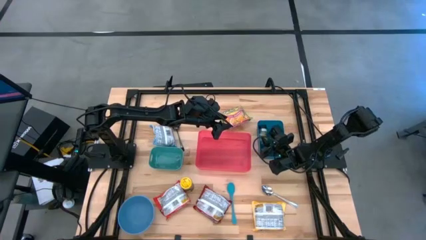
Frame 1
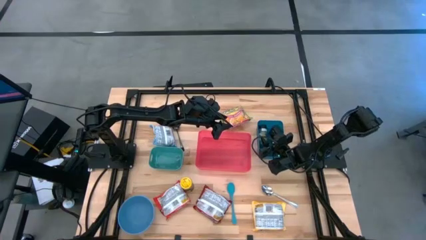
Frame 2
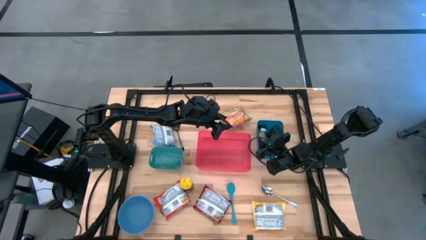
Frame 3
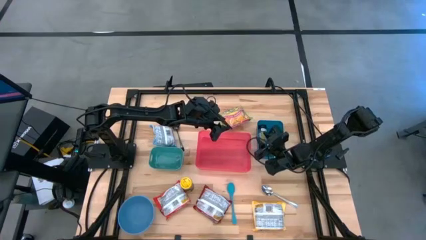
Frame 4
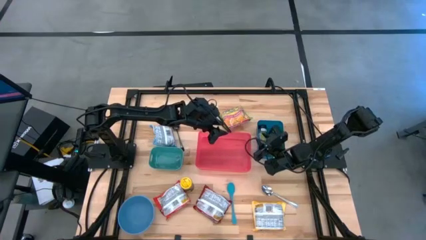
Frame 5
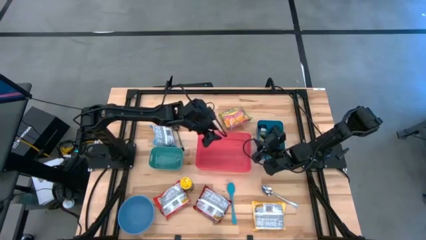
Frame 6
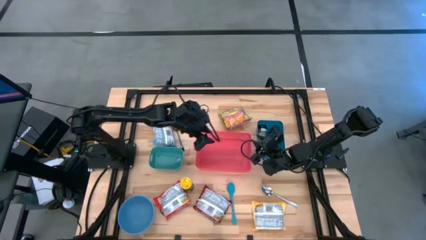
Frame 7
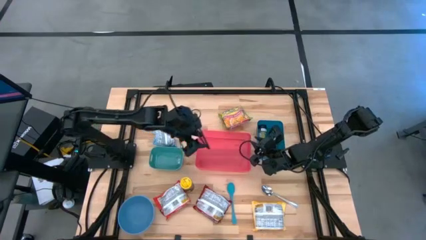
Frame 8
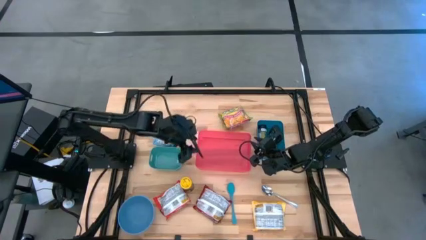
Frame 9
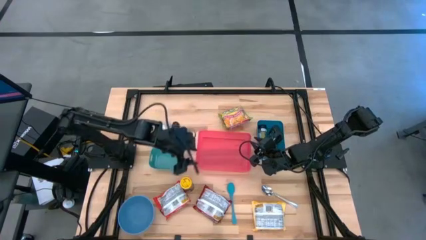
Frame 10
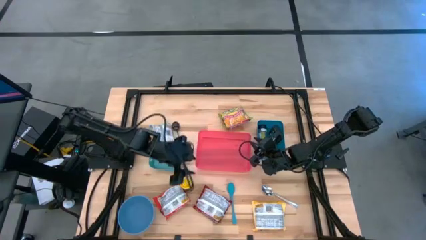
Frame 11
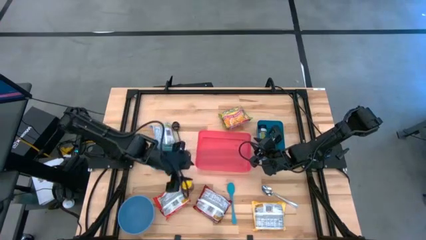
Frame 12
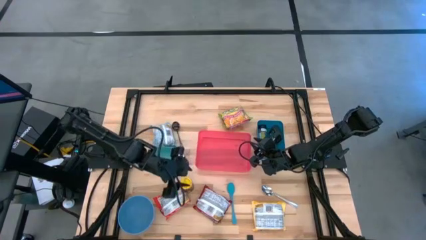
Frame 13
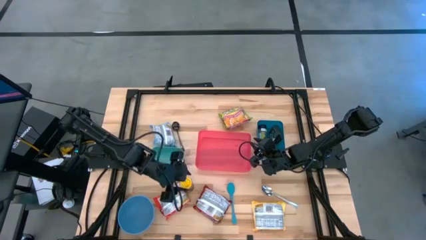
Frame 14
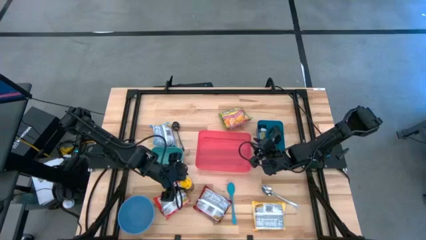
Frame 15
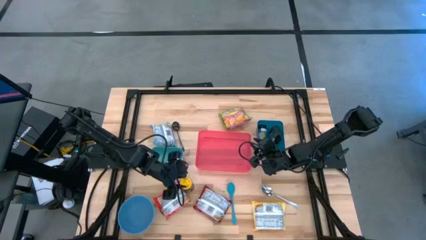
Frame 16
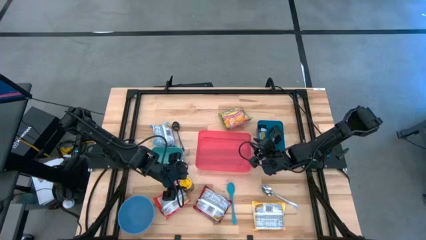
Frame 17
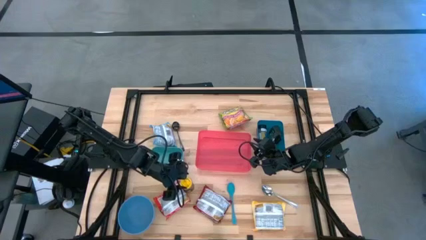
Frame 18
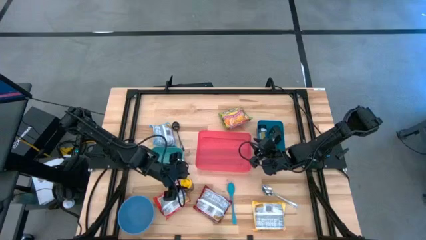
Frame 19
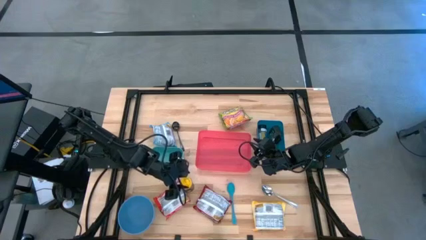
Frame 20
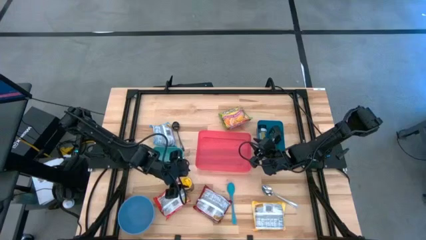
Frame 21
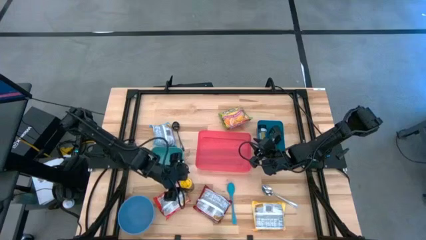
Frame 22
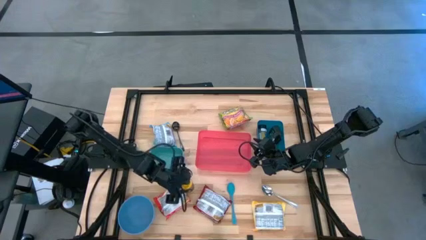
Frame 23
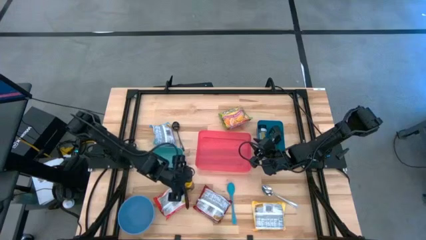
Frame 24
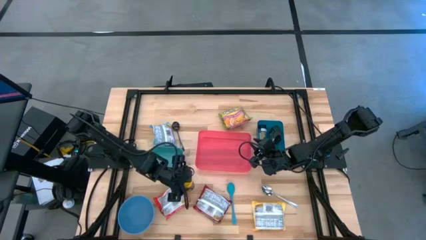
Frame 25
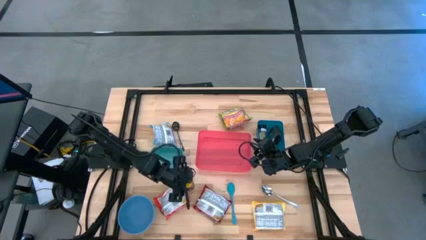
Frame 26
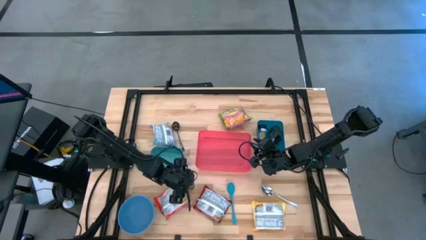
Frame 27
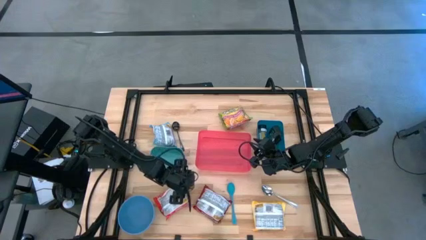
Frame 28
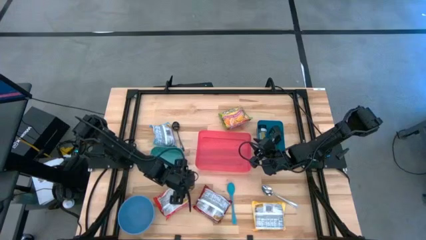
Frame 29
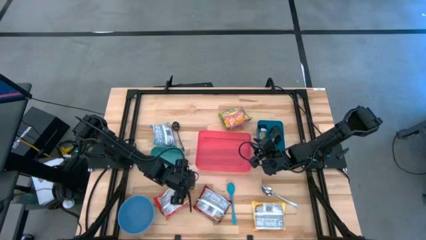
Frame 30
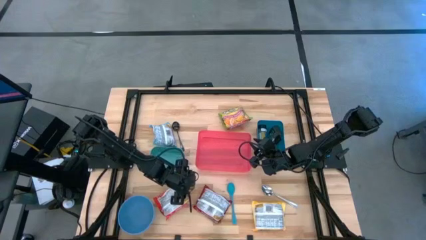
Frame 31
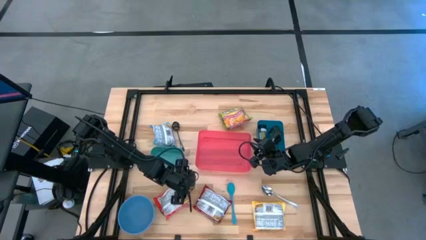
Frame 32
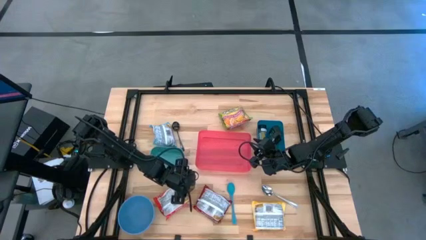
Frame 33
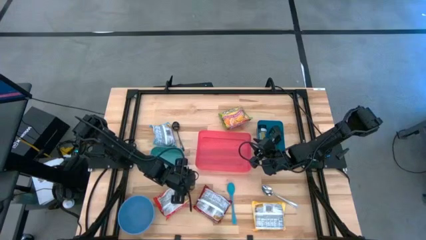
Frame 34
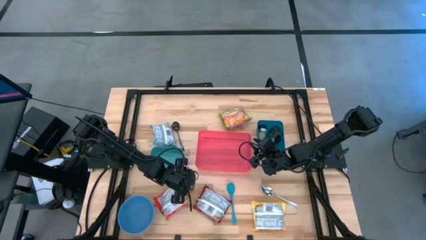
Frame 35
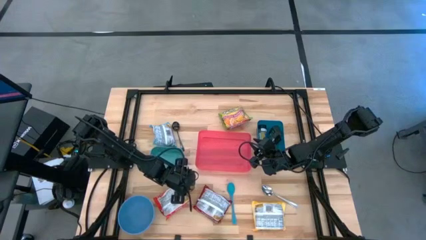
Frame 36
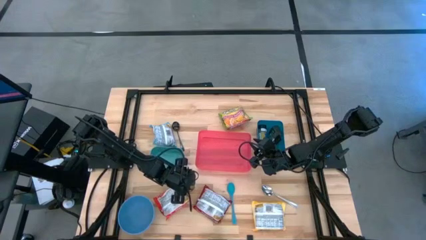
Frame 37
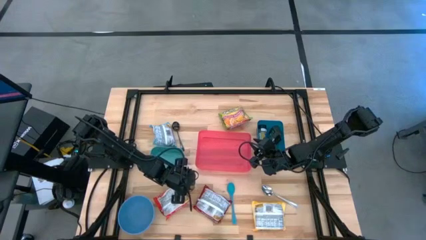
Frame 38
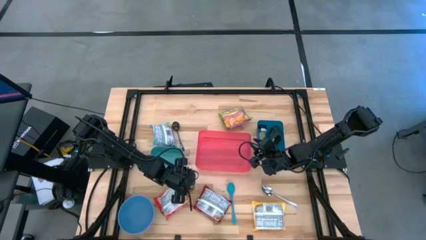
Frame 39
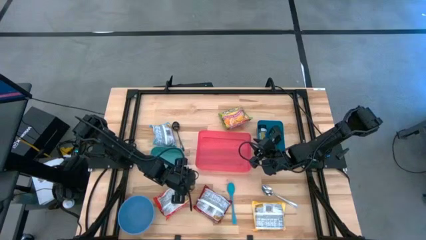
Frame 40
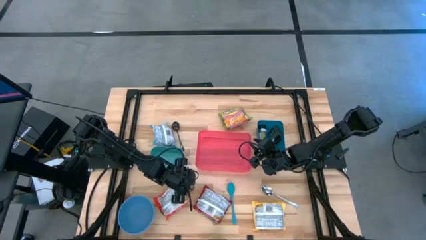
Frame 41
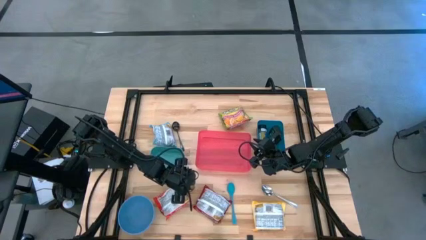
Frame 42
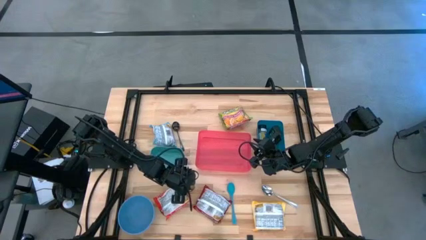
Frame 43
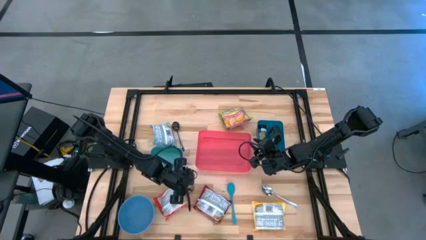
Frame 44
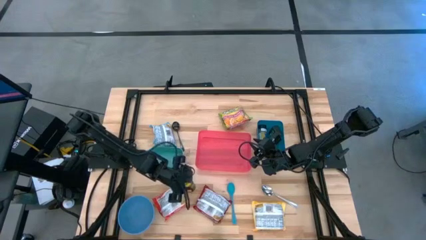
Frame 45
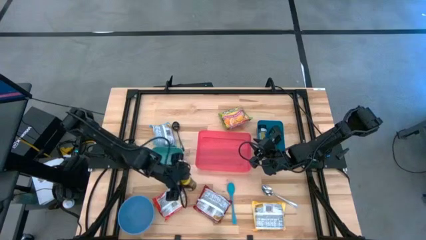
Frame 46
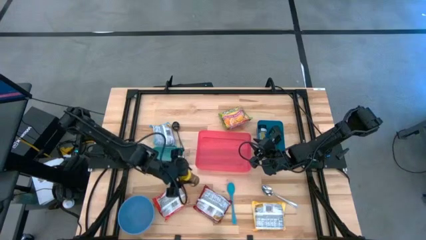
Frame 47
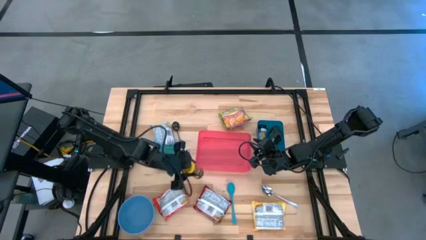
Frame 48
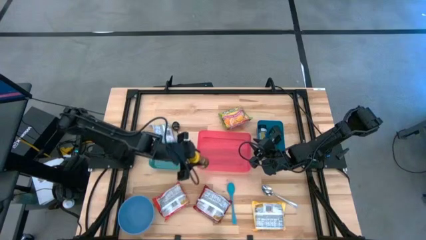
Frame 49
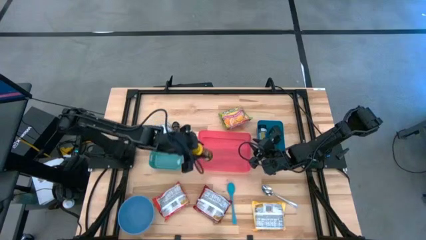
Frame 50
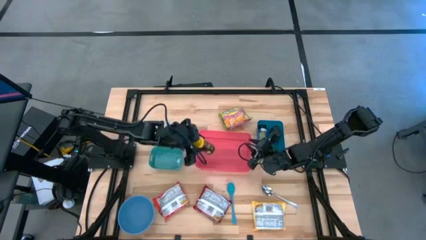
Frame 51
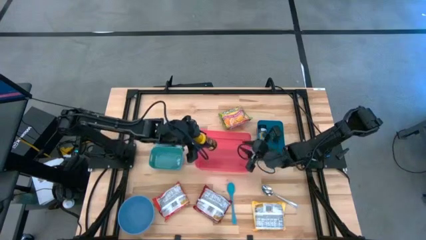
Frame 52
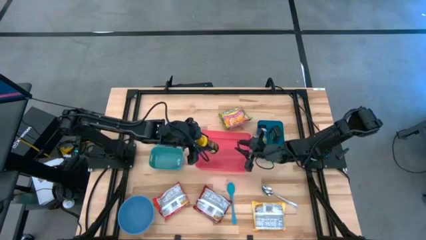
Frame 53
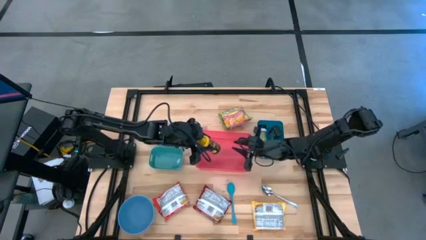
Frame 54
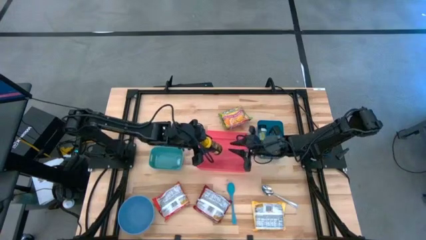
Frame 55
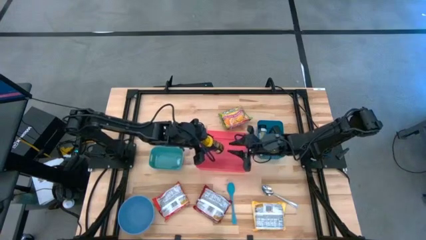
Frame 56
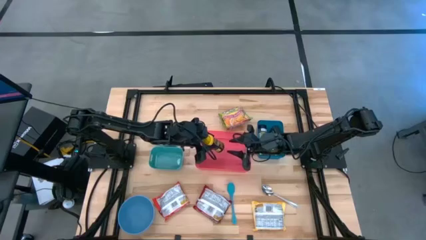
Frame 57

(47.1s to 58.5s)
Task: Pick & Place Food Item
Put the yellow seasoning bottle into the blue bin

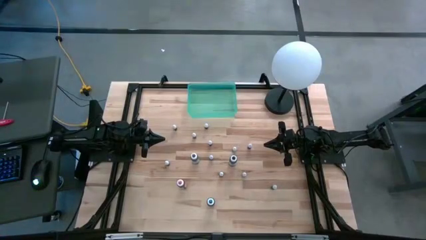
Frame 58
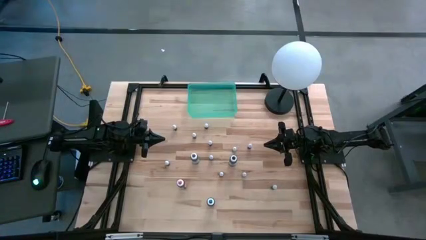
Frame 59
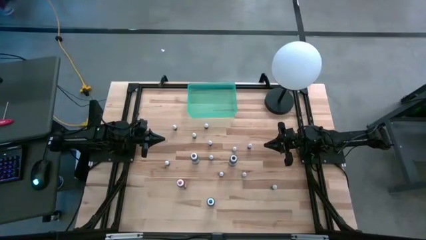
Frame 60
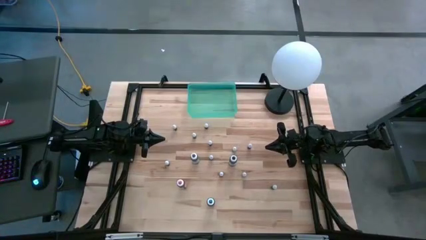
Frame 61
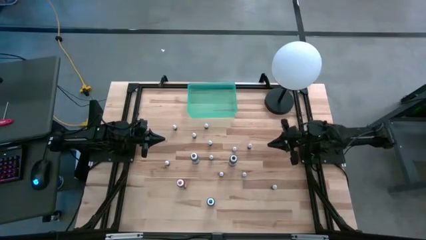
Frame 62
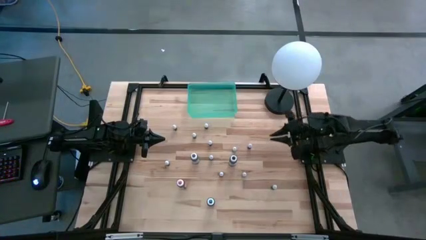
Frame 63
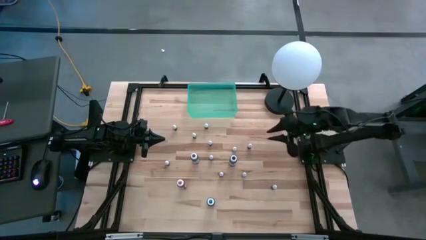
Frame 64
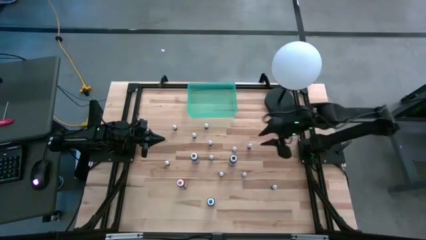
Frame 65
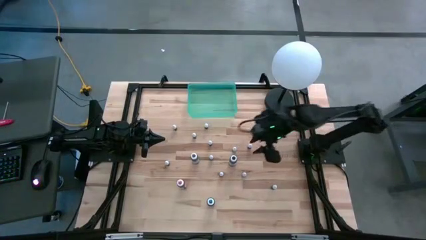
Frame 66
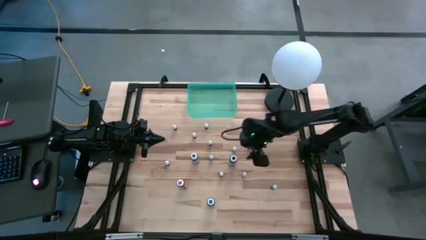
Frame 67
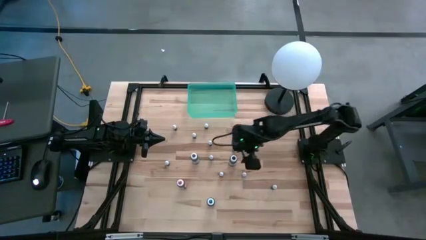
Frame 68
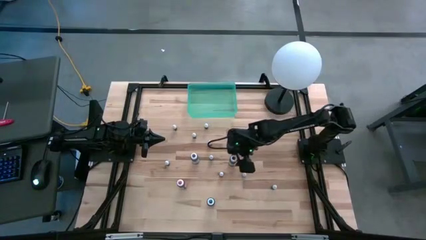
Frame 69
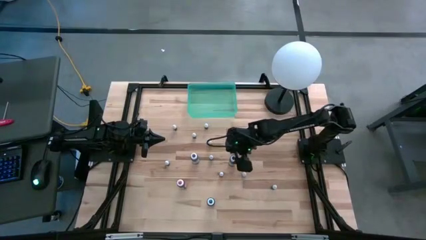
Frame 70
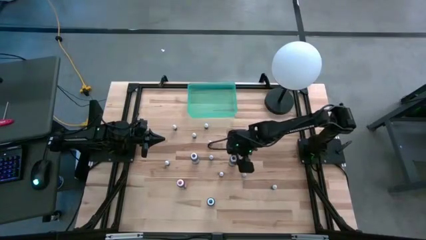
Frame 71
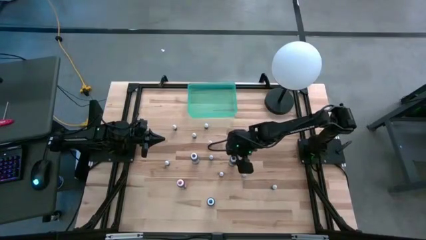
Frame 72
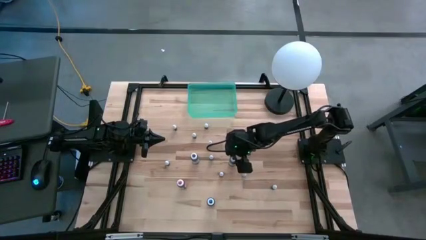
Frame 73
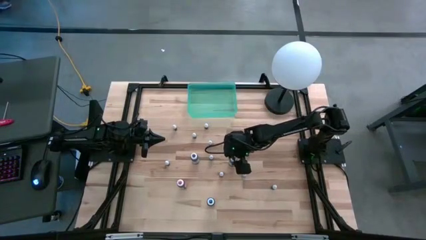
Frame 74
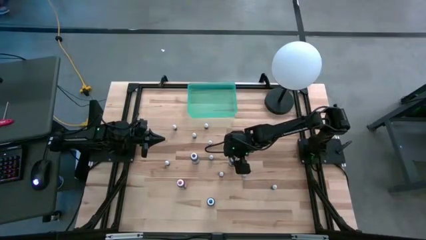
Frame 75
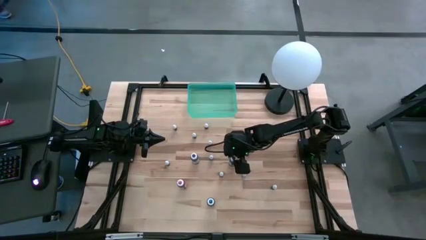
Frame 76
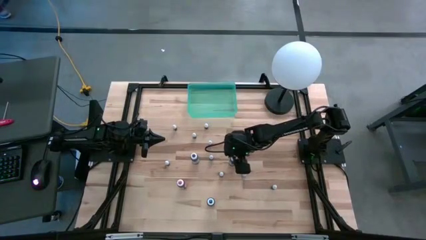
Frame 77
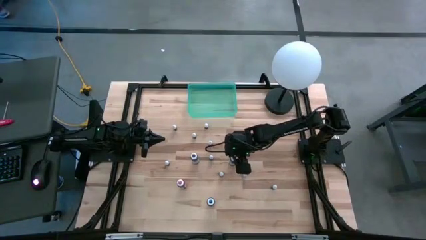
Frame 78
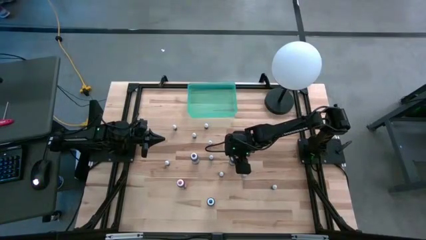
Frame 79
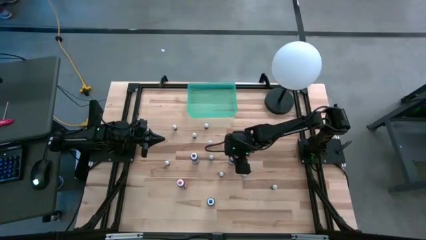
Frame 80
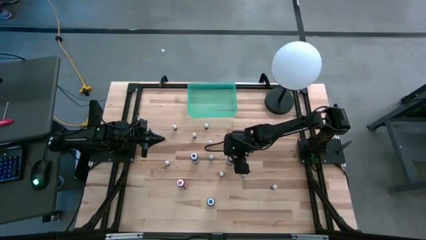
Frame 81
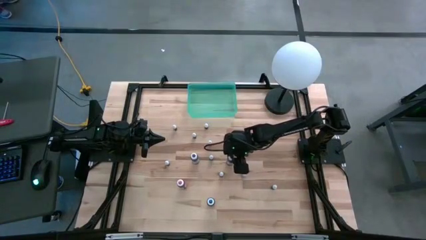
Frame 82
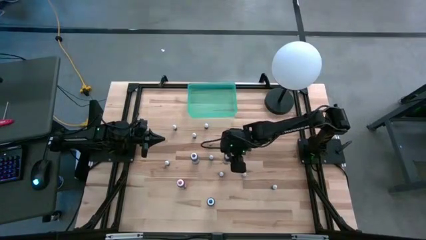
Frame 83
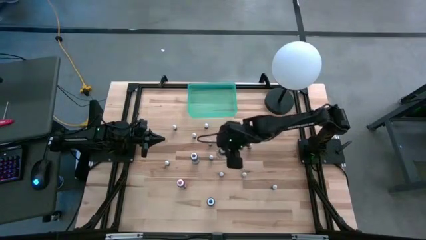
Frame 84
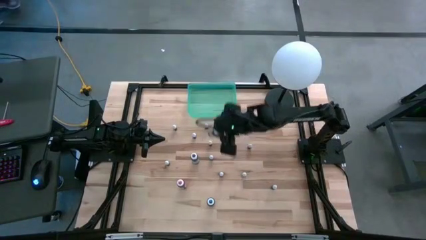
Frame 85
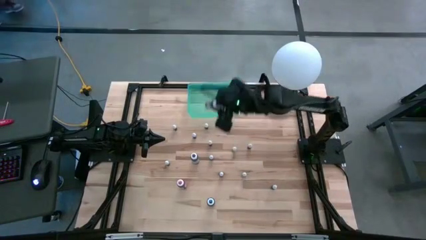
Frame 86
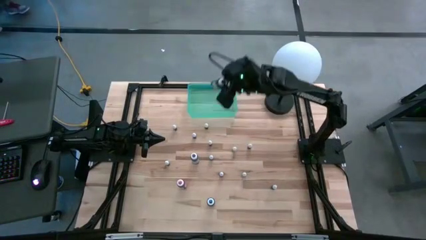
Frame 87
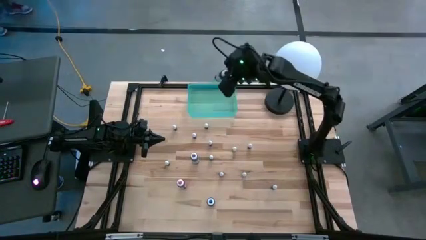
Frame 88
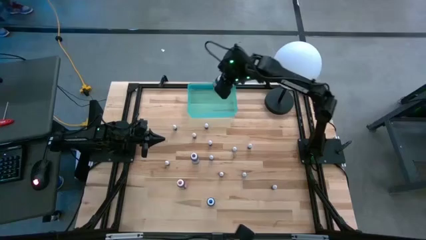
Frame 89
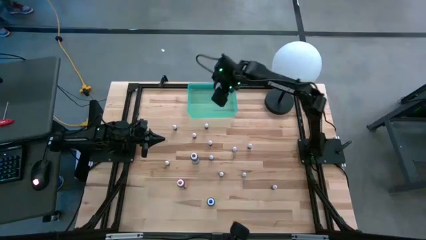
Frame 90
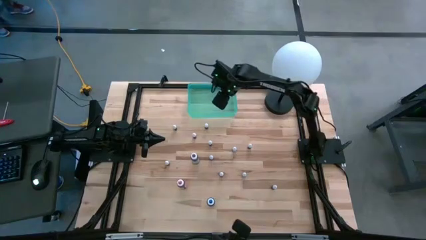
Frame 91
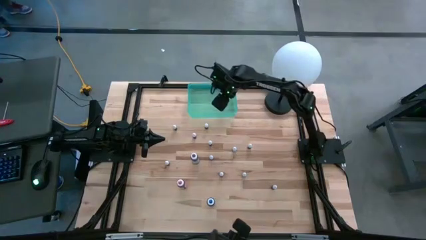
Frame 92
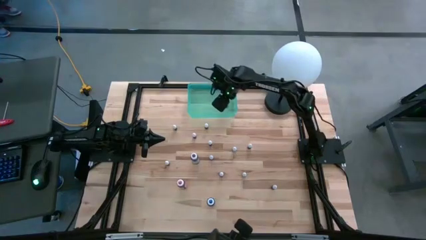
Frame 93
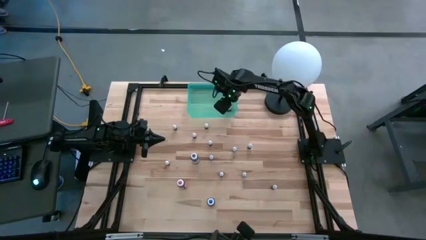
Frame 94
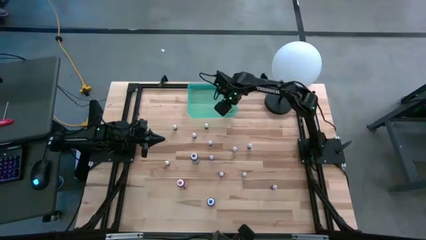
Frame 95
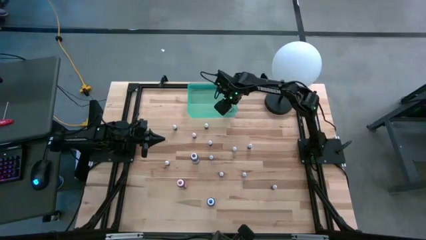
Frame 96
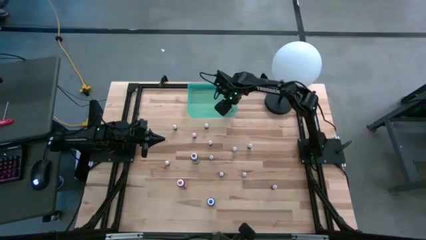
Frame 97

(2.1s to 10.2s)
Task: Pick & Place food coloring
Put the large black food coloring into the bin
